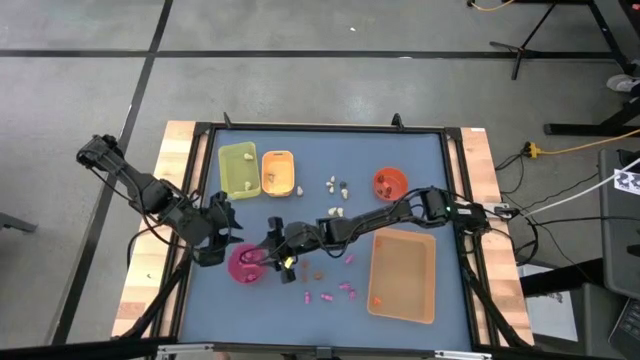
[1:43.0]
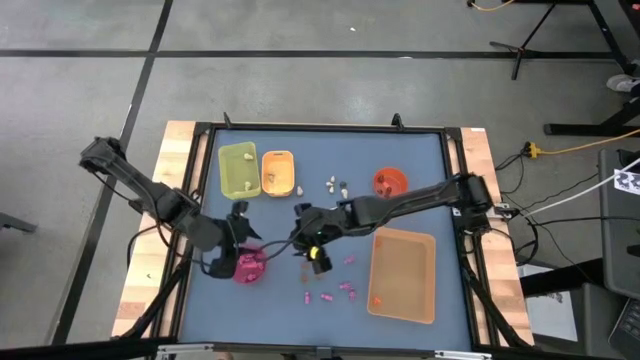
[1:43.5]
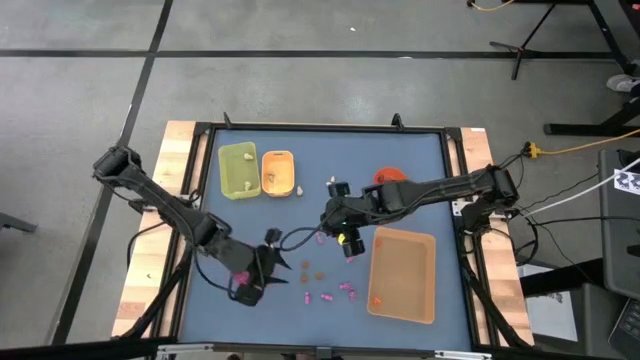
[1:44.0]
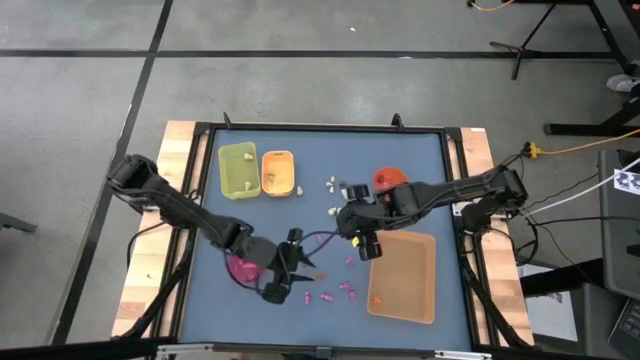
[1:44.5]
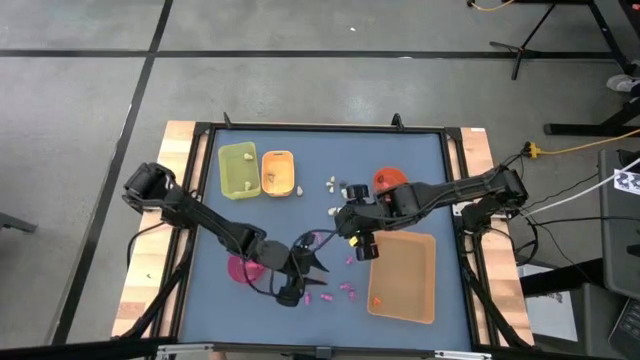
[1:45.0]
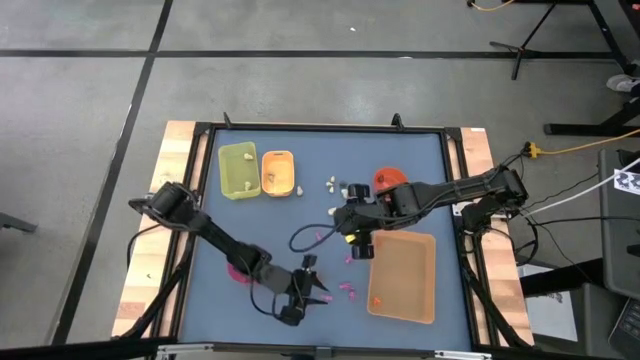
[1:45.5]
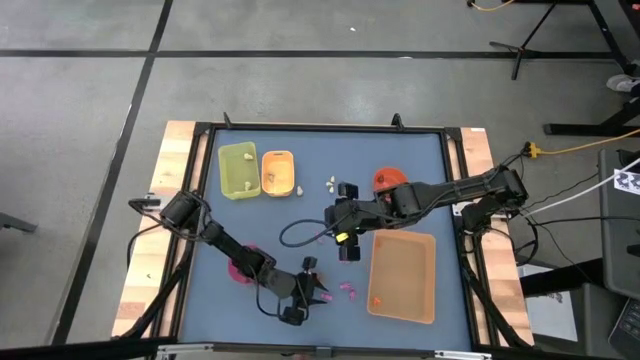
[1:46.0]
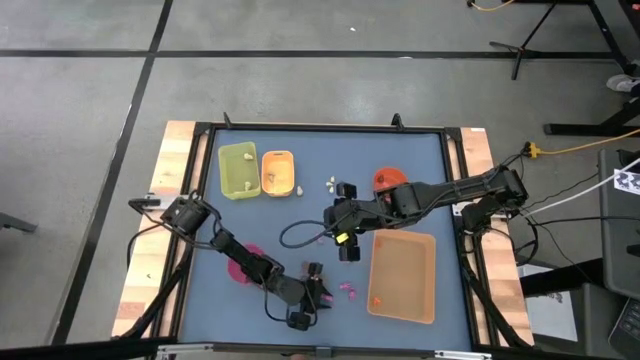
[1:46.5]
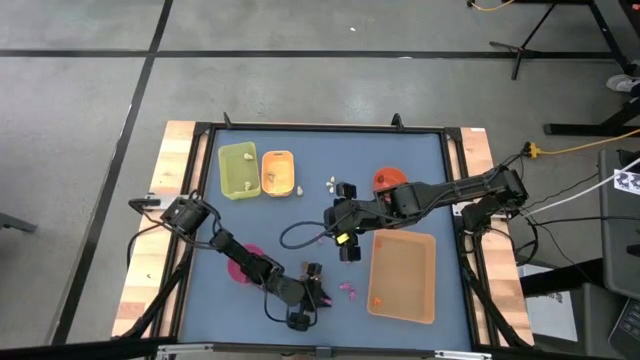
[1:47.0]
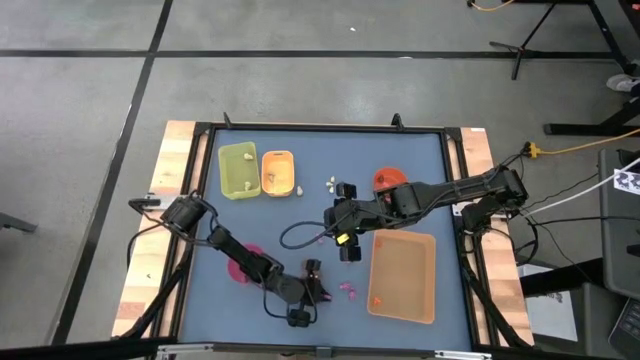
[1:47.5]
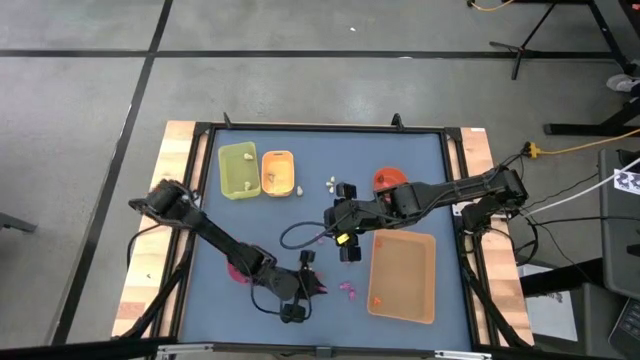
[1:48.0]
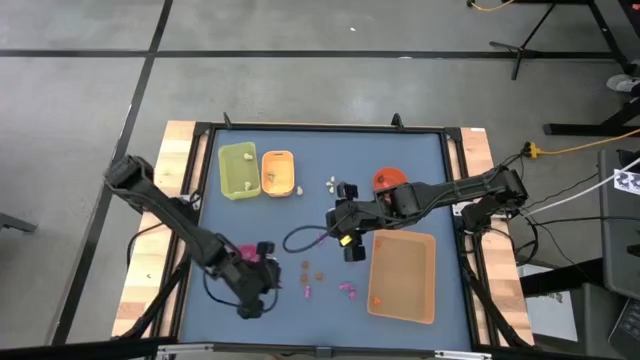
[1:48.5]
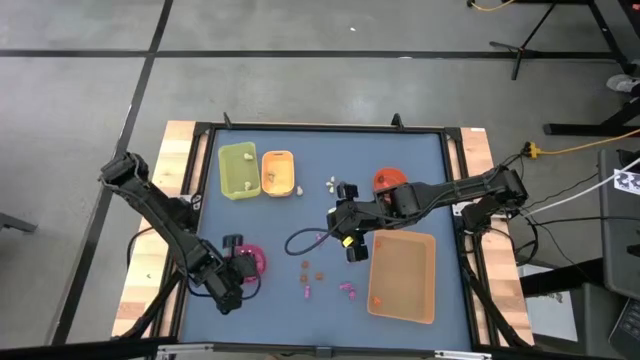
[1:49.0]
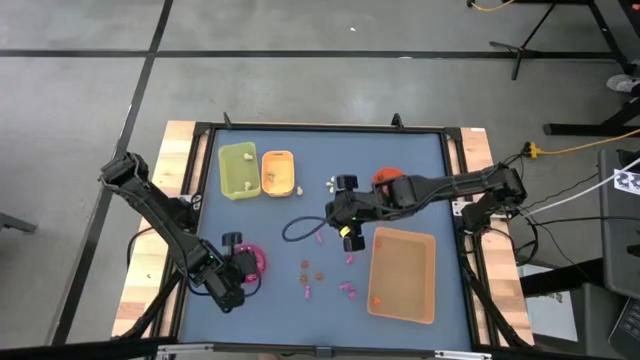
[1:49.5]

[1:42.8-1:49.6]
Task: Sort Halloween decoration
Put the pink skeleton toy into the red bowl

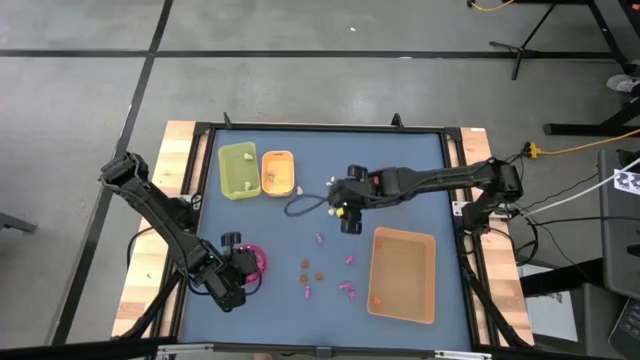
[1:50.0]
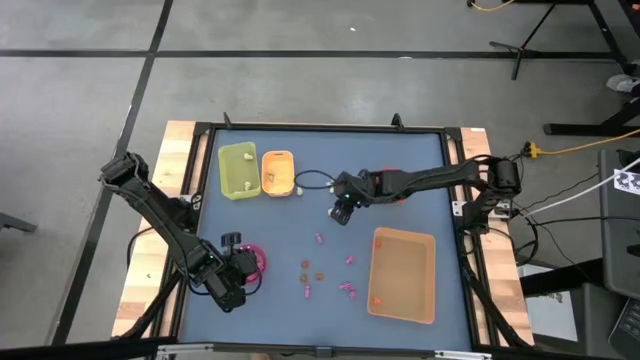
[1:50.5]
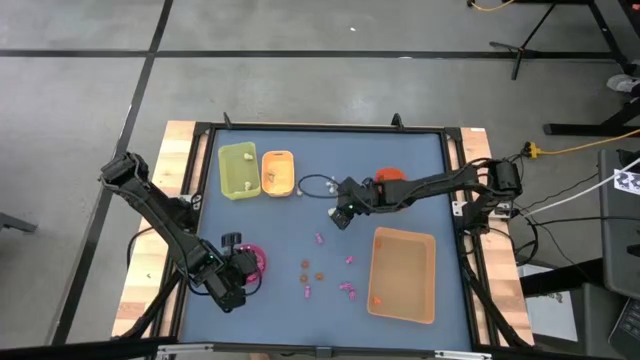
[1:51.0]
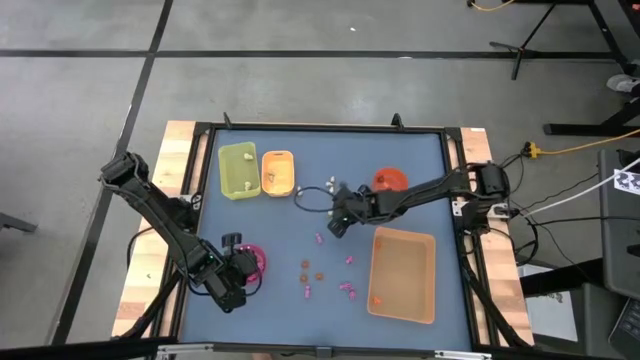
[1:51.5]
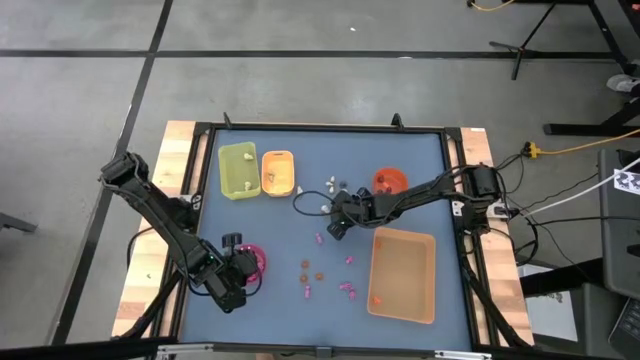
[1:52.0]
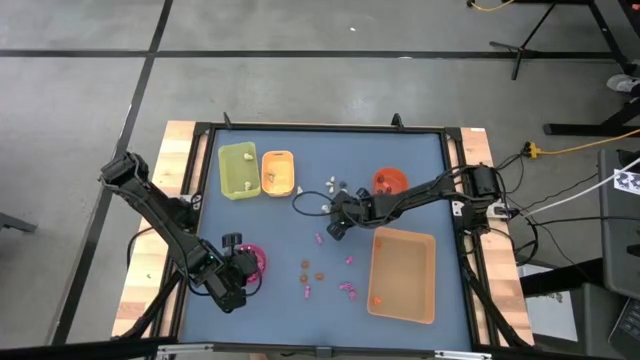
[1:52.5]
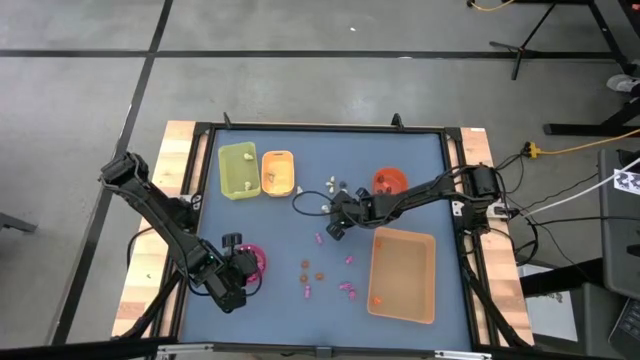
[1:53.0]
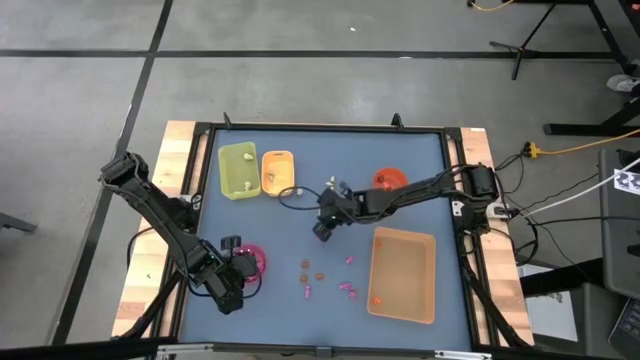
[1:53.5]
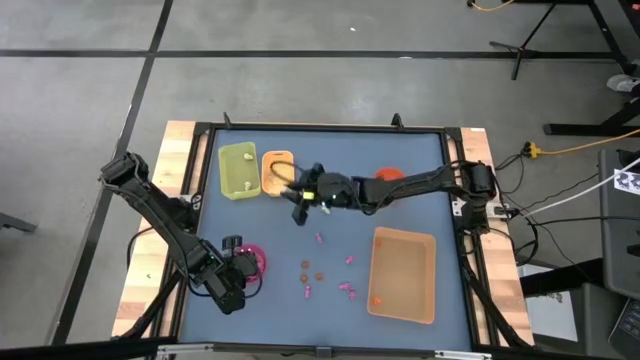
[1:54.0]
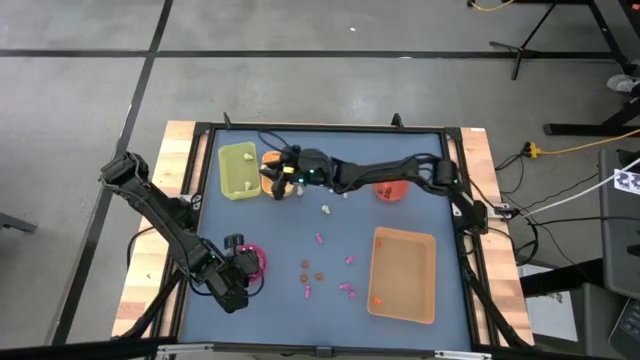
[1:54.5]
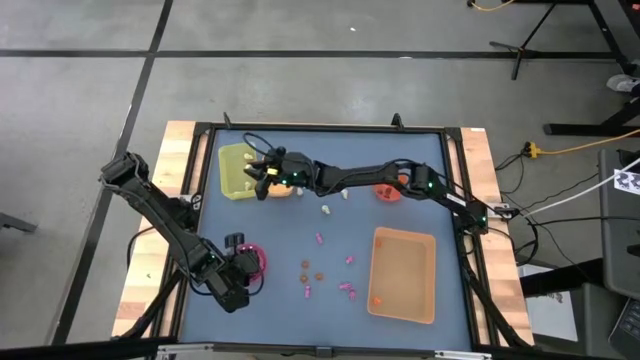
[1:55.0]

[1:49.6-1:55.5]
Put the white skull toy into the yellow bin

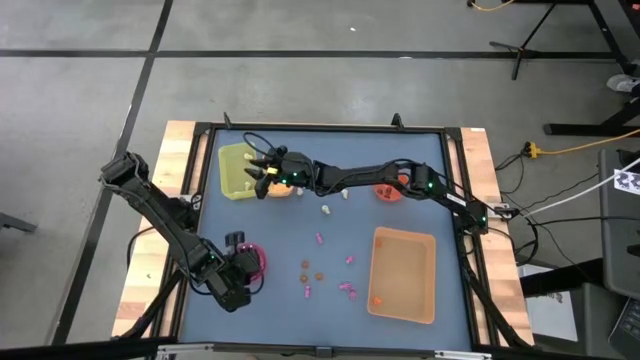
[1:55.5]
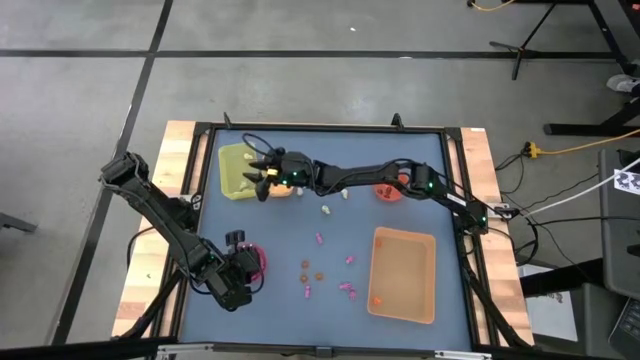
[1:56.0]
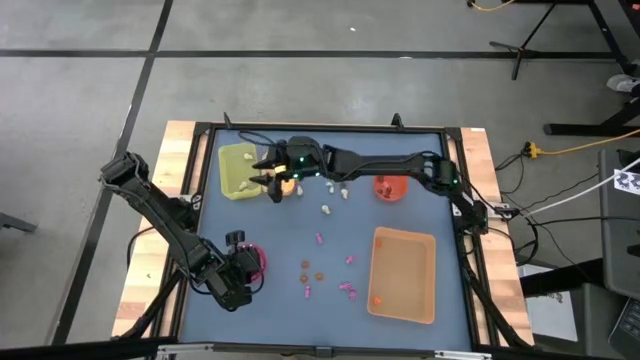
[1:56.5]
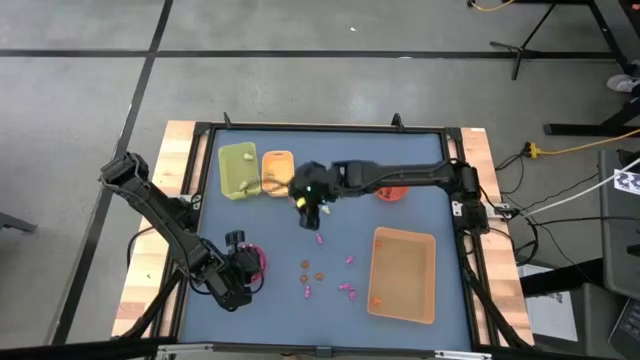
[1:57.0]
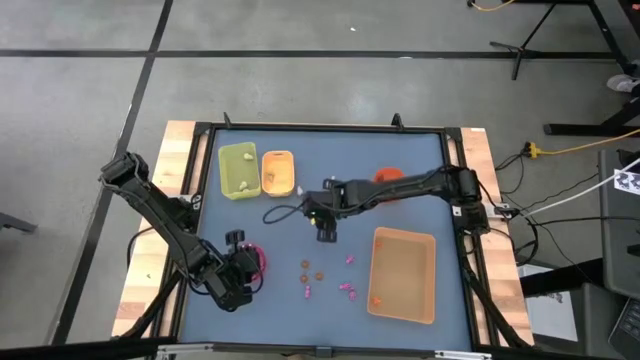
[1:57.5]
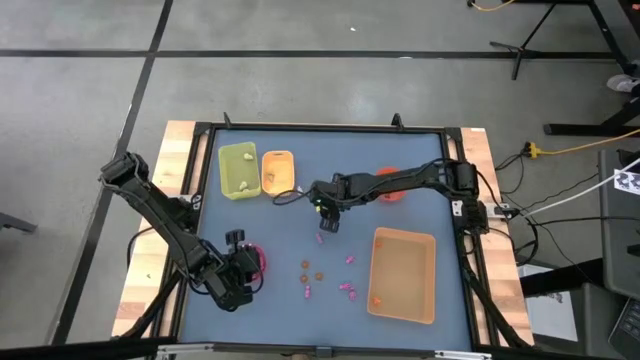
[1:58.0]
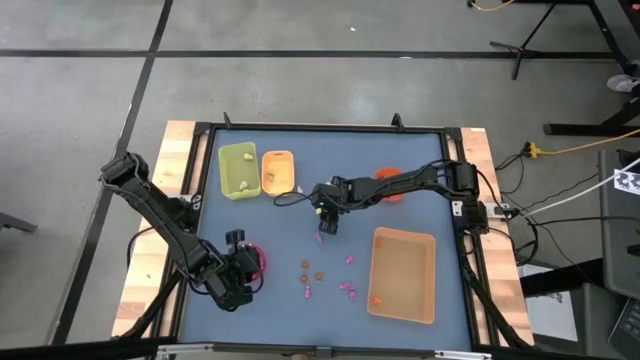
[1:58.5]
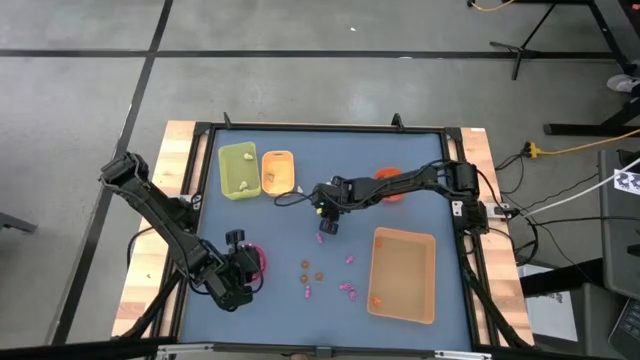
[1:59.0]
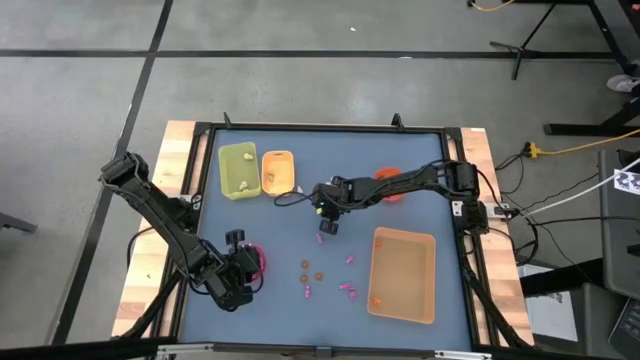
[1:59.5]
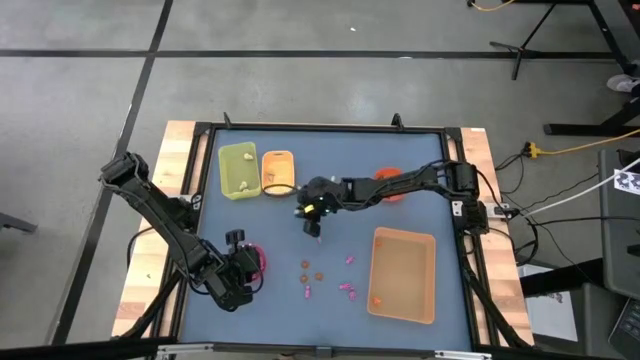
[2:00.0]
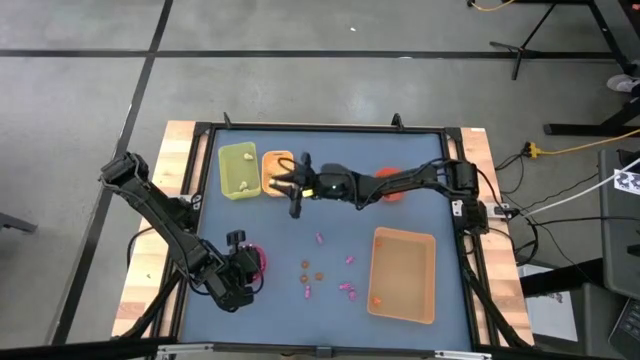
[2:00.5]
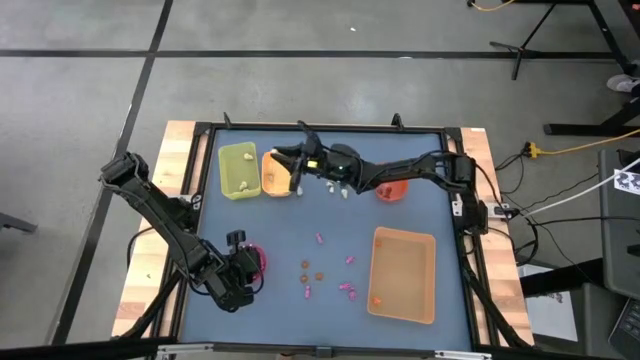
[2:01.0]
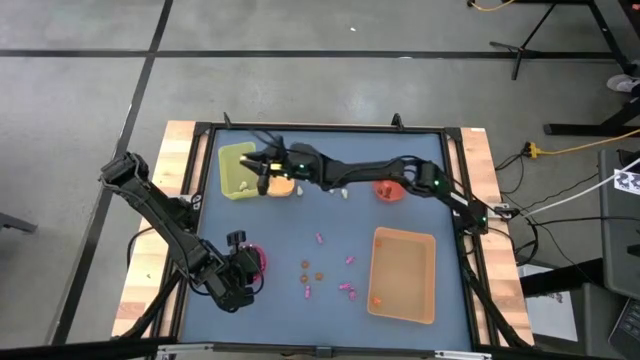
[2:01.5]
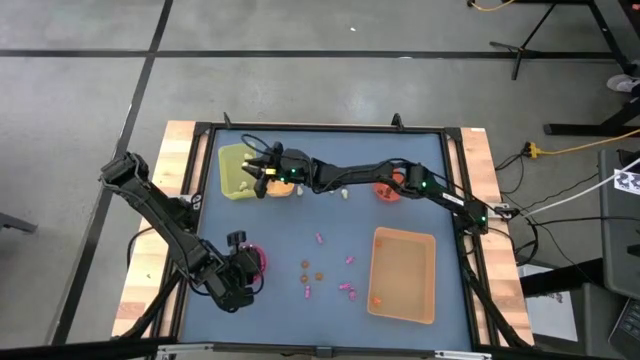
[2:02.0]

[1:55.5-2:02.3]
Put the white skull toy into the yellow bin
